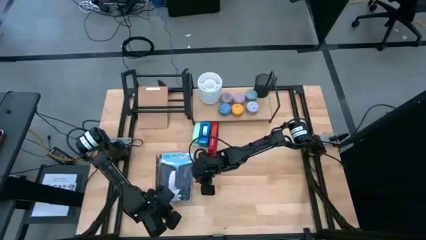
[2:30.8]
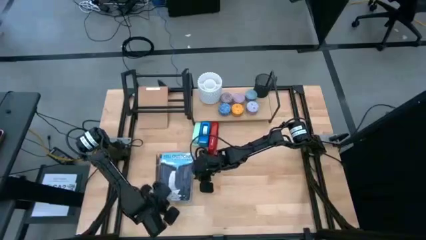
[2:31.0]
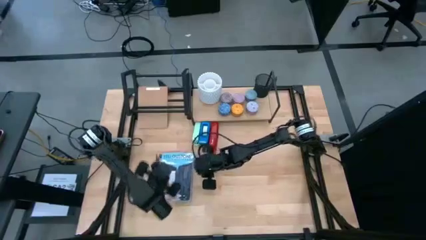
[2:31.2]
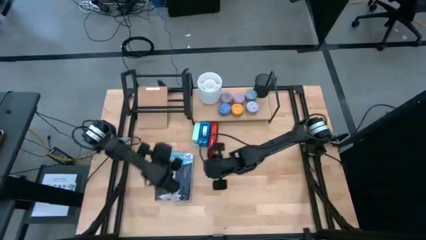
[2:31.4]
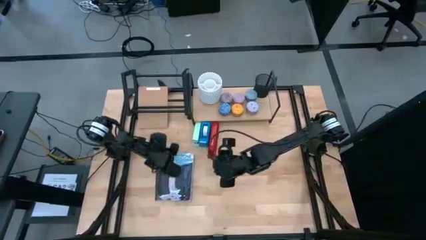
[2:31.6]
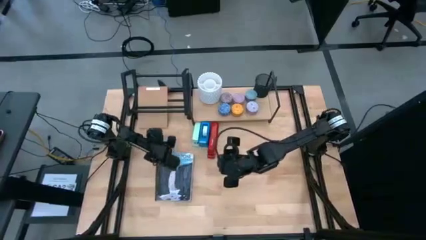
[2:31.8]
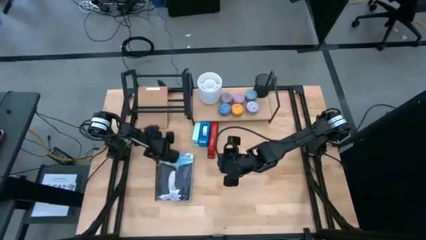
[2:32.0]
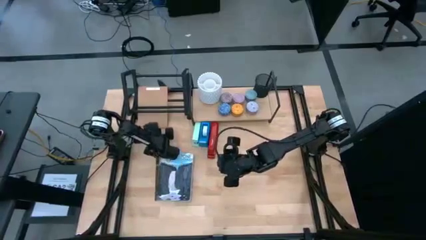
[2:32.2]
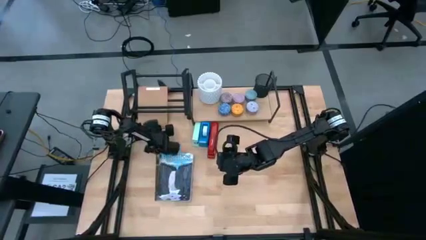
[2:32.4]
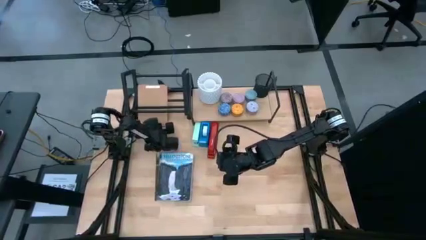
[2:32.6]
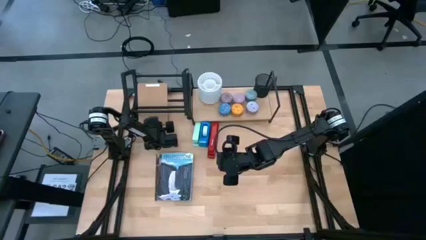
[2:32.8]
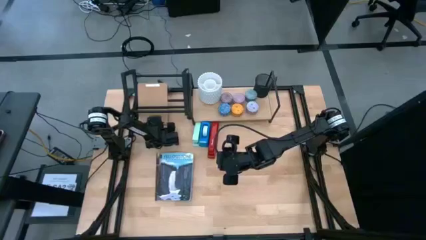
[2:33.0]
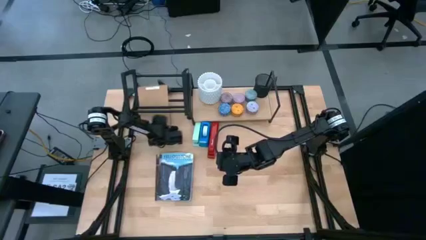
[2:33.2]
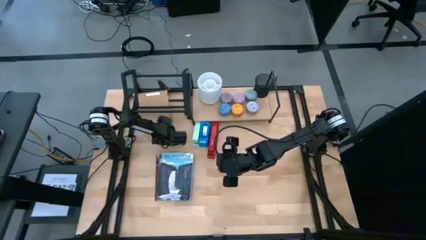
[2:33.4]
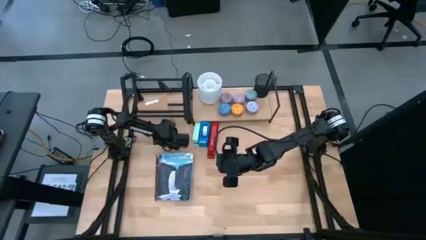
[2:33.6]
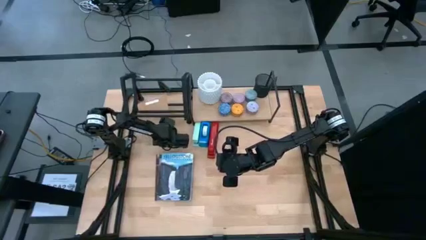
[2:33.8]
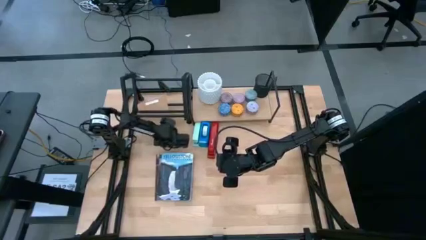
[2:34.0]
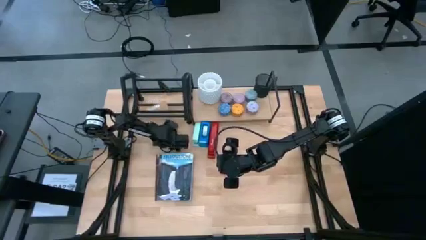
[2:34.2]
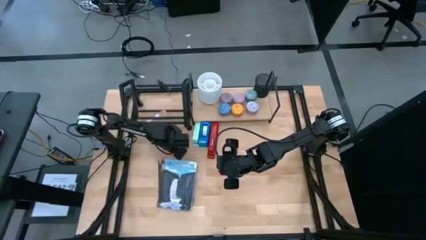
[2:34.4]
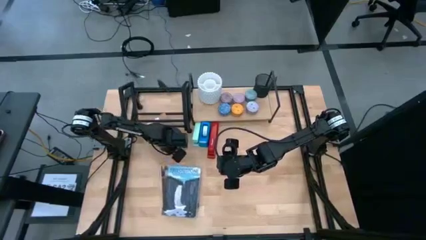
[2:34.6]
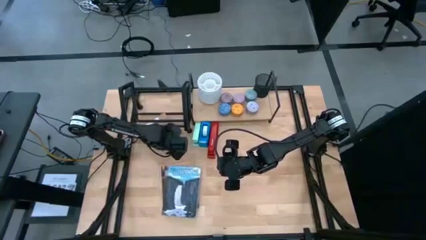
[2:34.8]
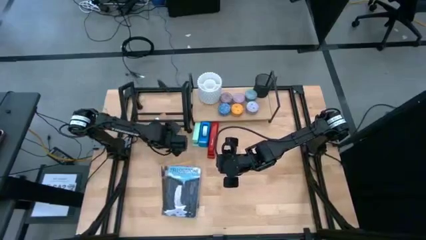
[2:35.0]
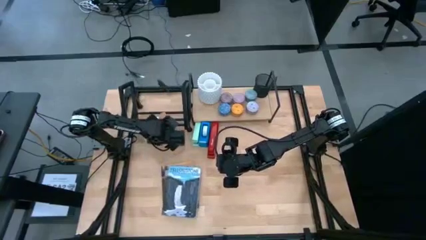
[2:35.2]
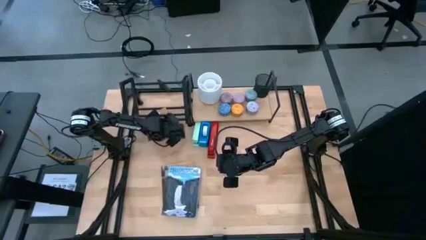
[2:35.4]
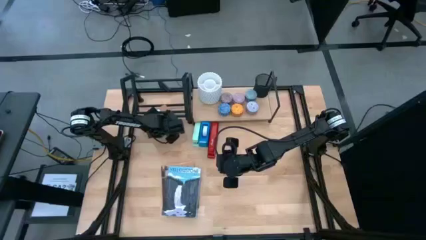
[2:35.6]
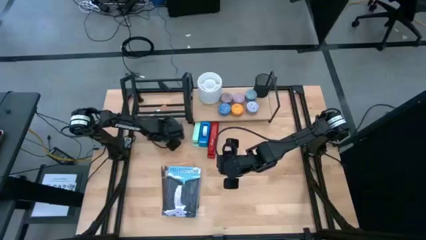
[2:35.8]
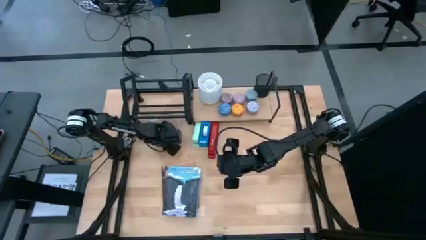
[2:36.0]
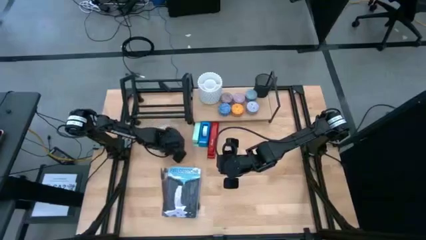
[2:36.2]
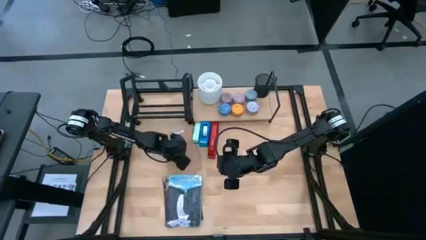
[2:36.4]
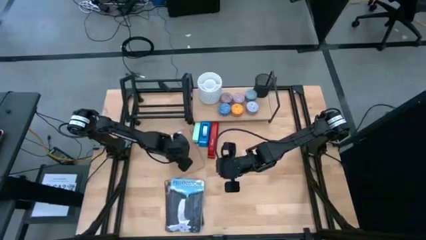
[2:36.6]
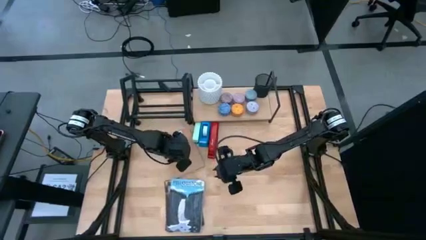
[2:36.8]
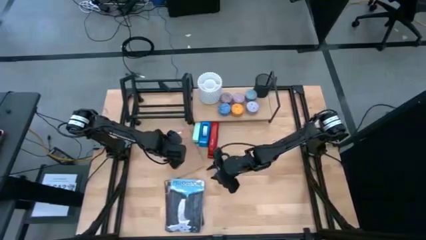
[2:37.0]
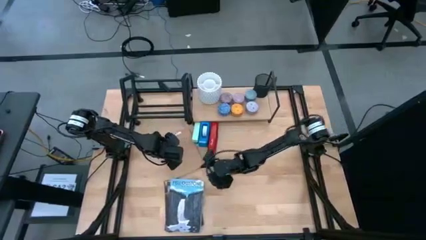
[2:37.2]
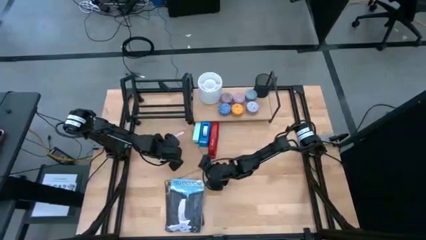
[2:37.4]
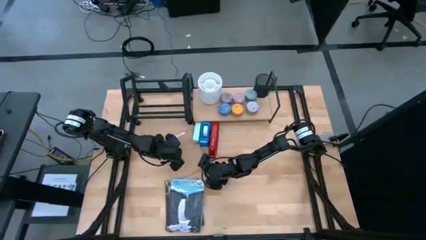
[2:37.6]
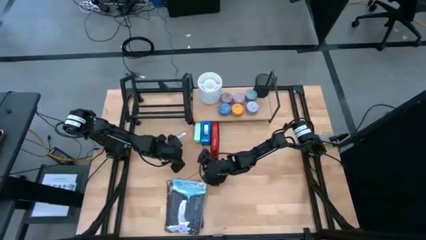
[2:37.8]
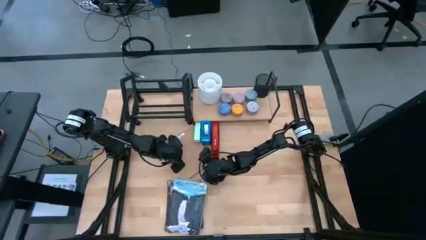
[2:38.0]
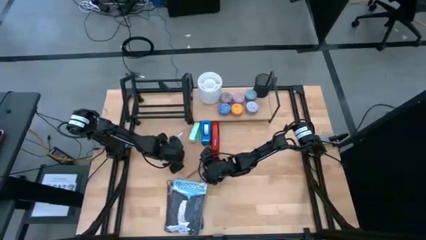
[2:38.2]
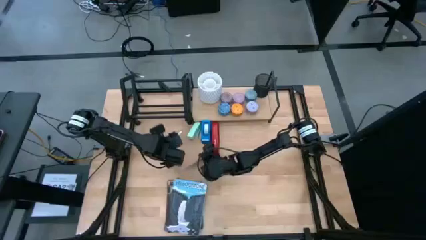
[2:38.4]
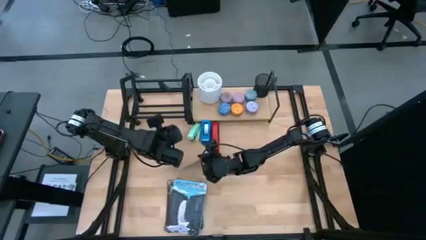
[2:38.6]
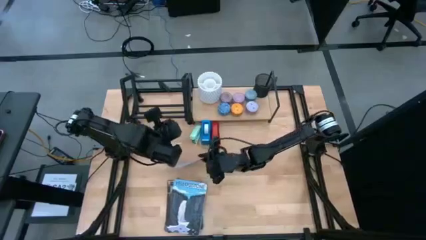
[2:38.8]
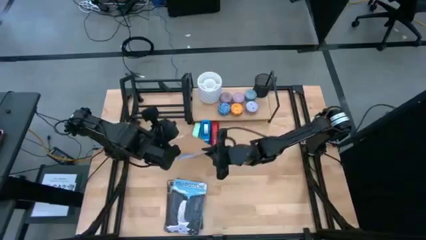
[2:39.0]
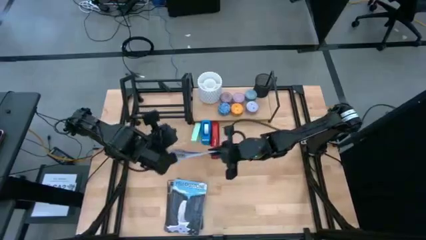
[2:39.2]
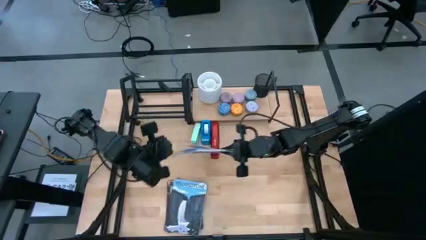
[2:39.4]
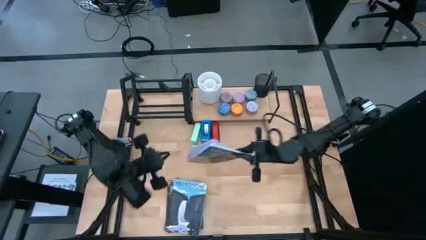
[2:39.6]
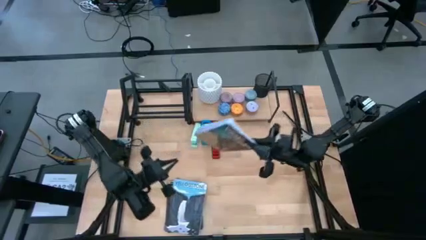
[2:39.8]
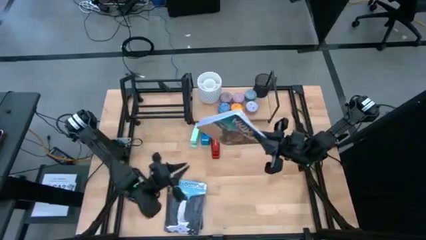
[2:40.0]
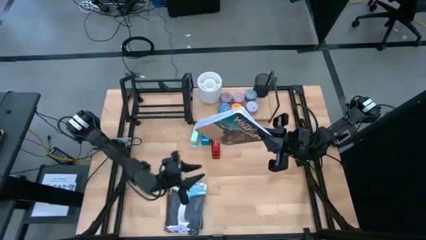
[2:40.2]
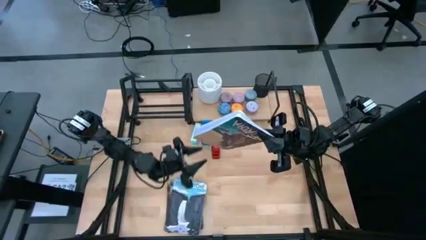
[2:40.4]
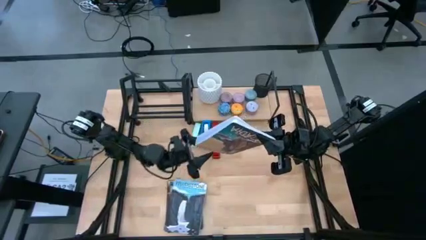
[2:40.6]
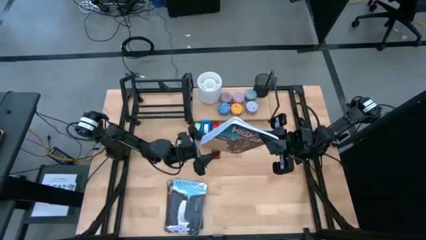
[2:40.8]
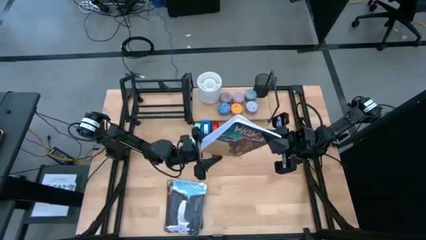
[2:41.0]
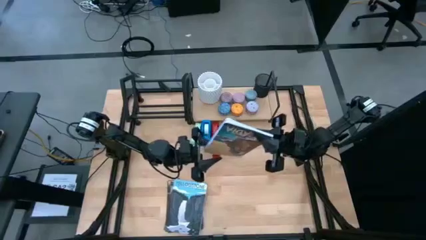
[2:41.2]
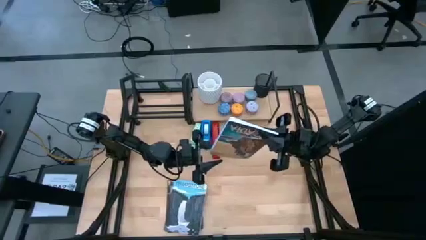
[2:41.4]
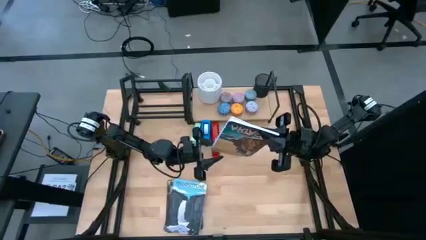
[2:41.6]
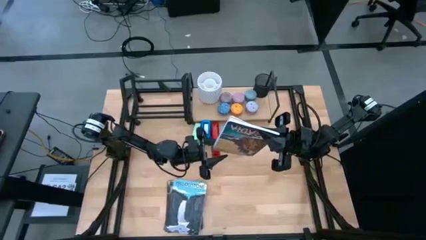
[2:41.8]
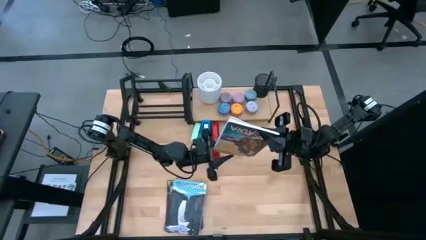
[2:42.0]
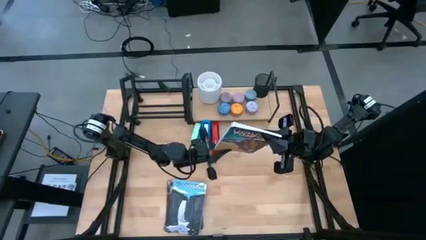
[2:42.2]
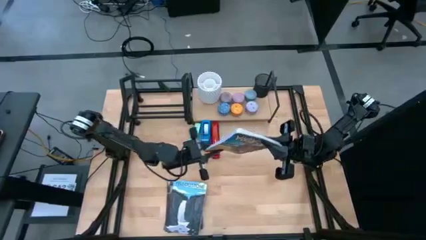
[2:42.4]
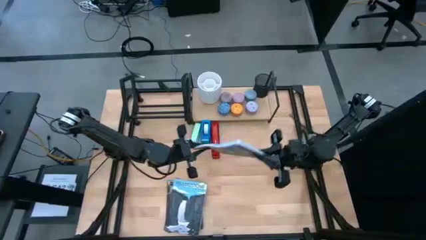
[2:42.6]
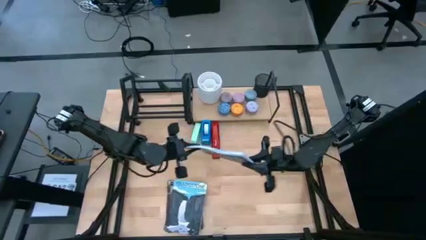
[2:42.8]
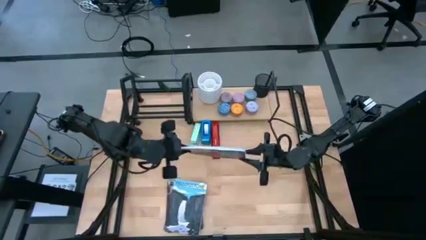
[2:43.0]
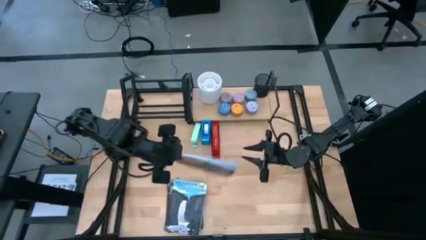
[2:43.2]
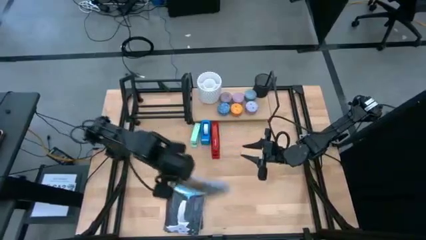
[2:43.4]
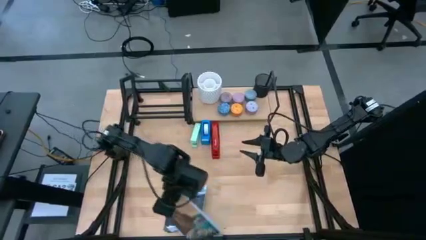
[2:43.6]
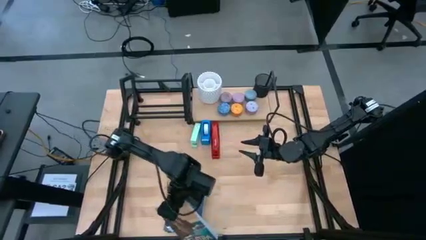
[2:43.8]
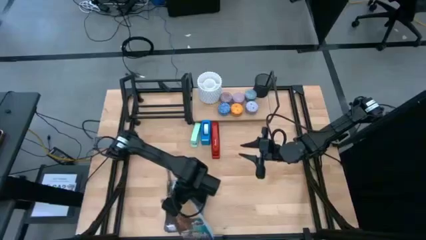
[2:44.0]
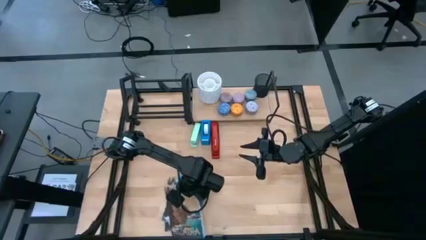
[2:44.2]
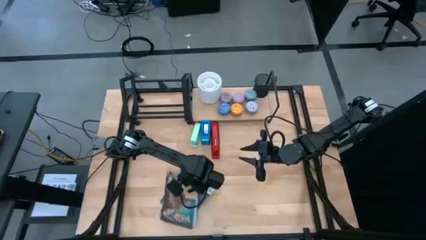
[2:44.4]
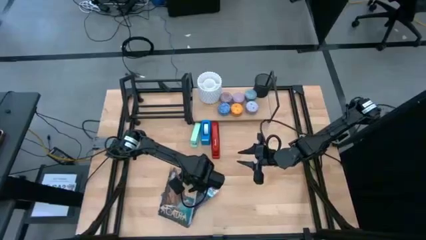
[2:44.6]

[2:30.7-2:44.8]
Task: Stock shelves
Remove the brown book from the bookshelf
